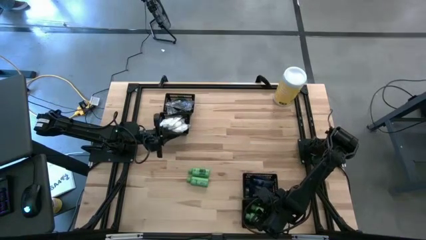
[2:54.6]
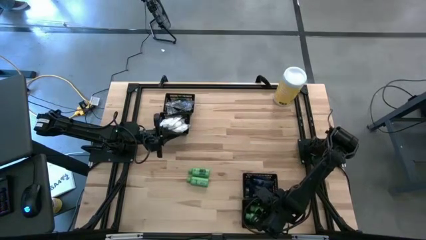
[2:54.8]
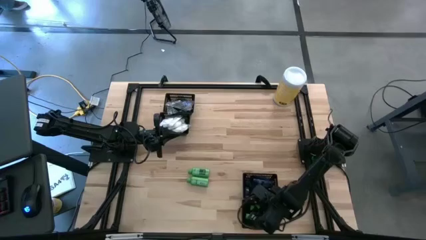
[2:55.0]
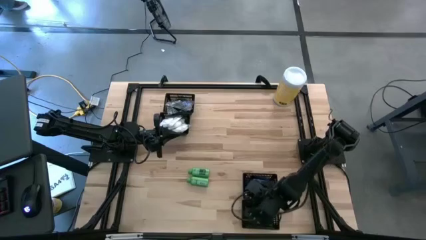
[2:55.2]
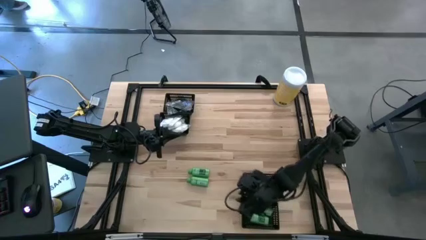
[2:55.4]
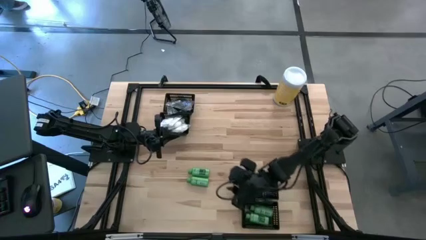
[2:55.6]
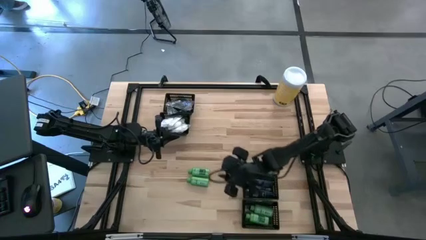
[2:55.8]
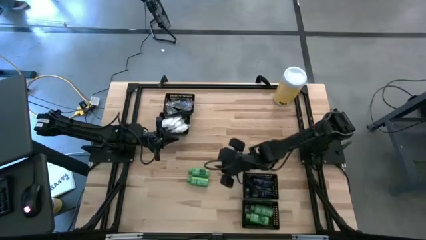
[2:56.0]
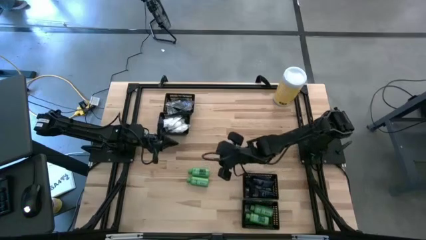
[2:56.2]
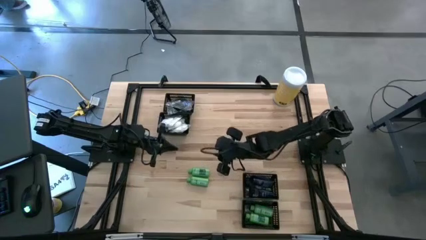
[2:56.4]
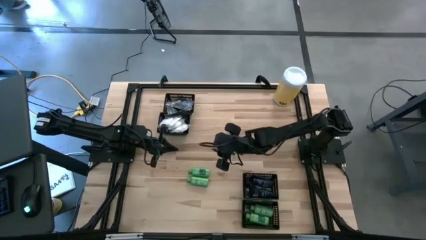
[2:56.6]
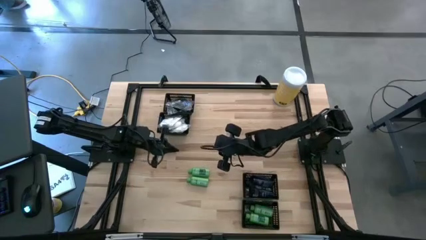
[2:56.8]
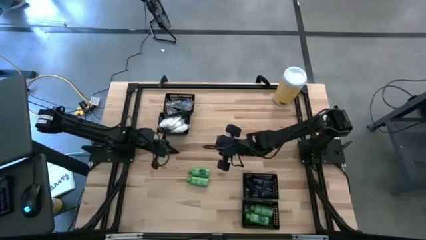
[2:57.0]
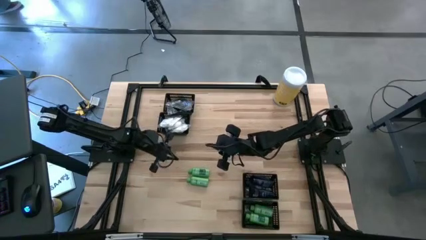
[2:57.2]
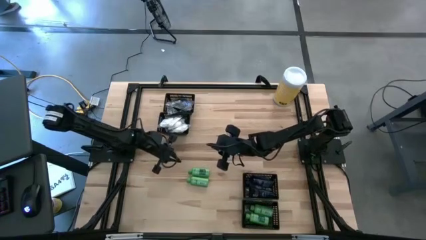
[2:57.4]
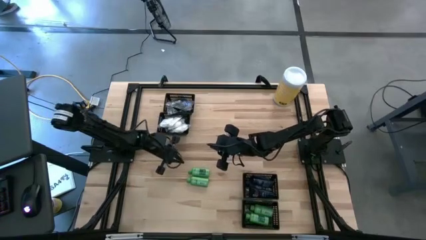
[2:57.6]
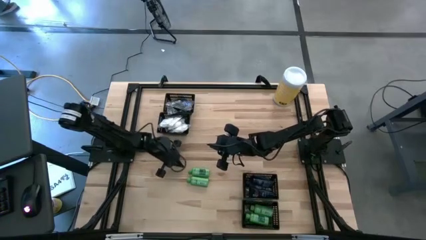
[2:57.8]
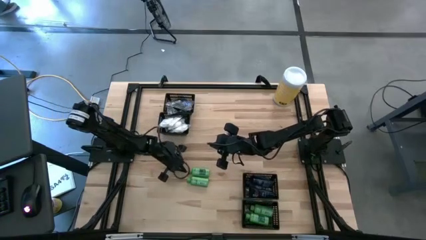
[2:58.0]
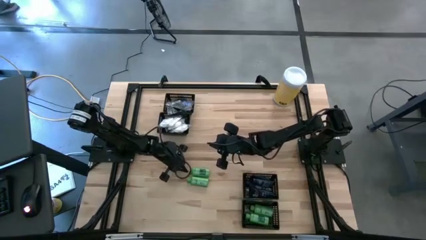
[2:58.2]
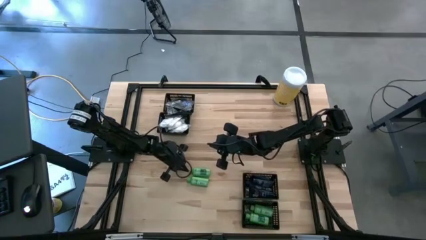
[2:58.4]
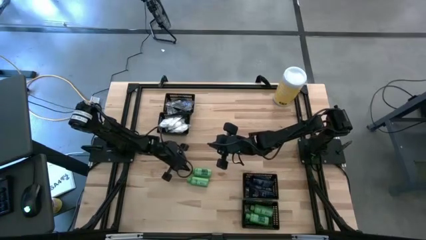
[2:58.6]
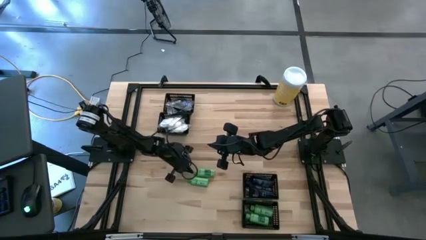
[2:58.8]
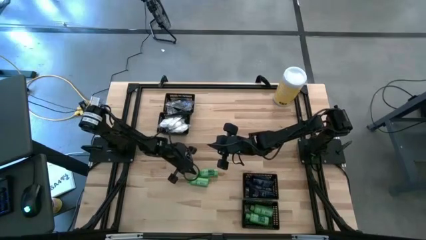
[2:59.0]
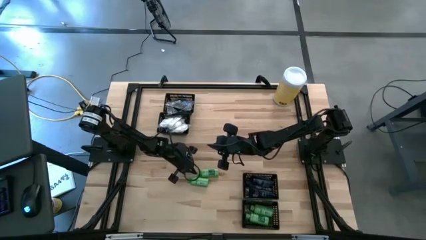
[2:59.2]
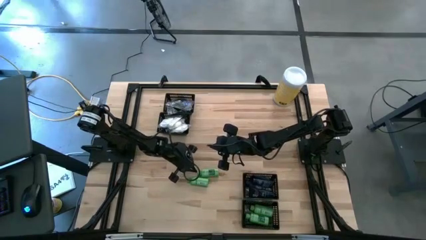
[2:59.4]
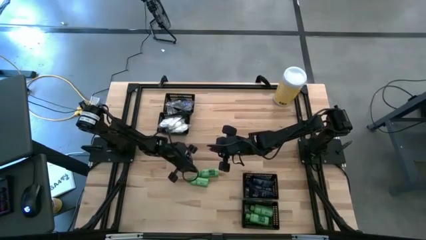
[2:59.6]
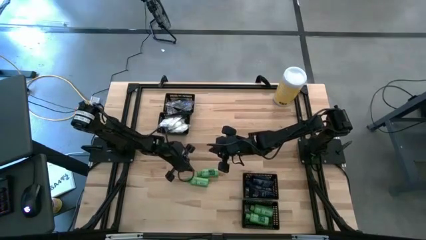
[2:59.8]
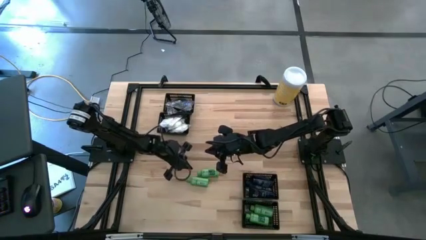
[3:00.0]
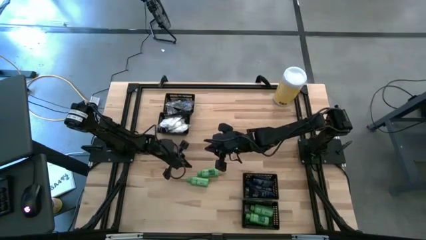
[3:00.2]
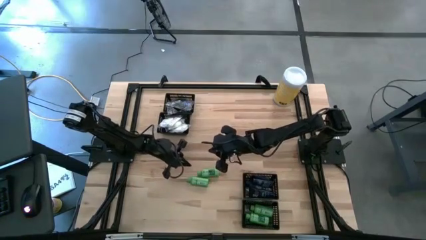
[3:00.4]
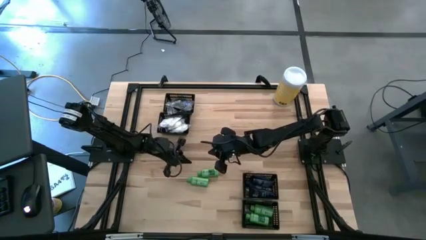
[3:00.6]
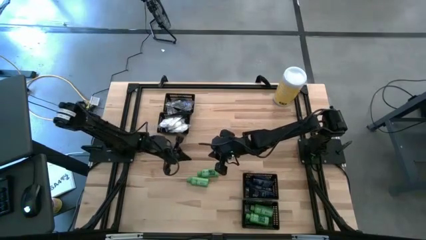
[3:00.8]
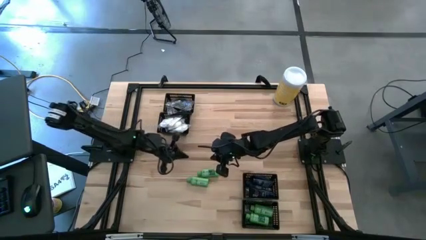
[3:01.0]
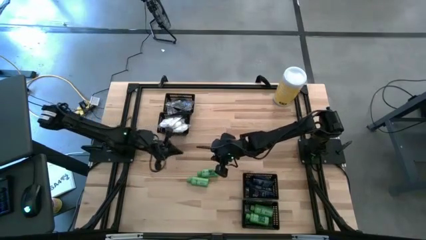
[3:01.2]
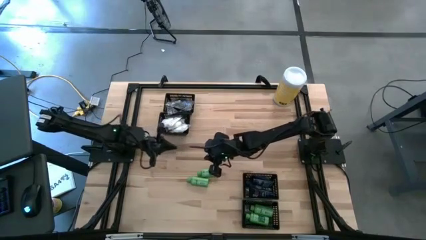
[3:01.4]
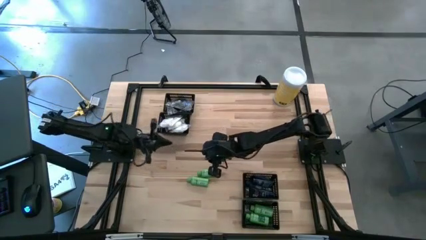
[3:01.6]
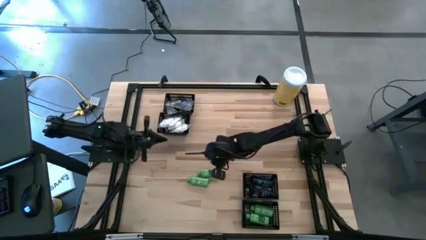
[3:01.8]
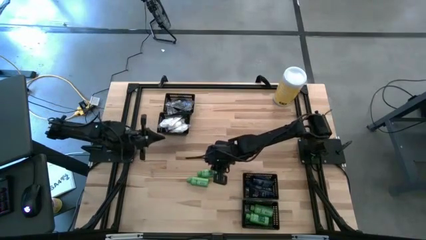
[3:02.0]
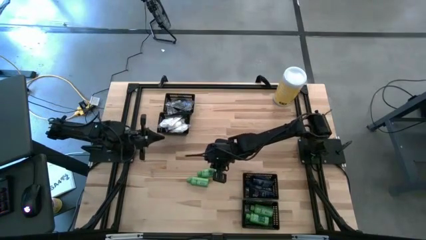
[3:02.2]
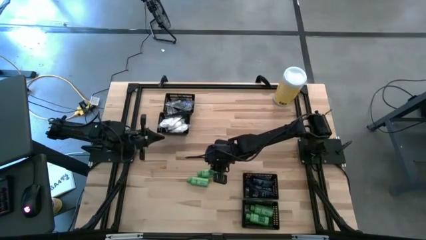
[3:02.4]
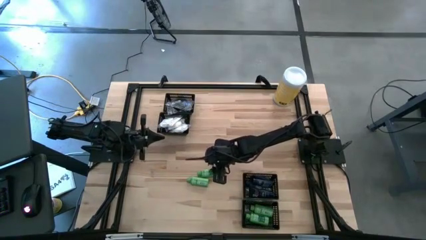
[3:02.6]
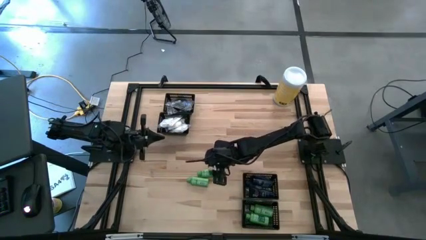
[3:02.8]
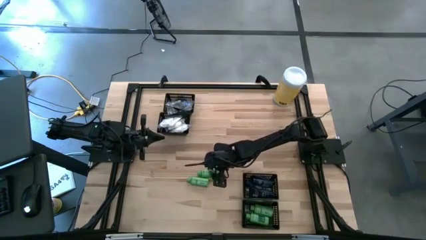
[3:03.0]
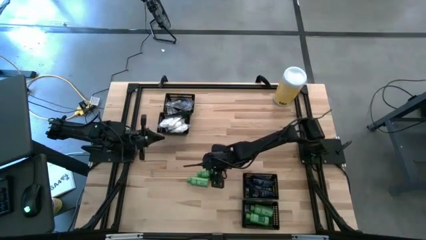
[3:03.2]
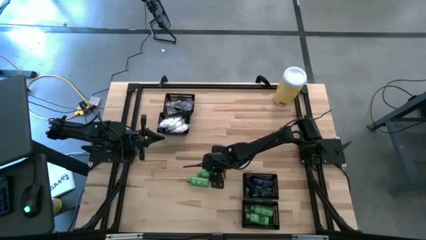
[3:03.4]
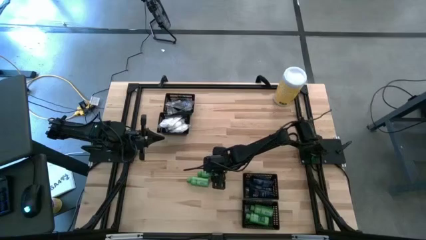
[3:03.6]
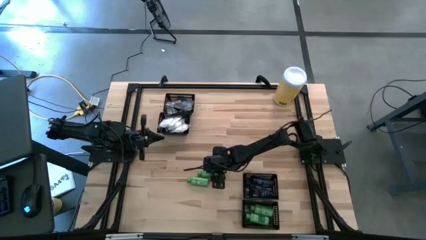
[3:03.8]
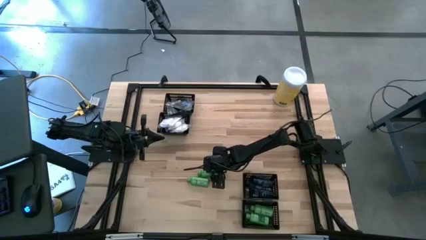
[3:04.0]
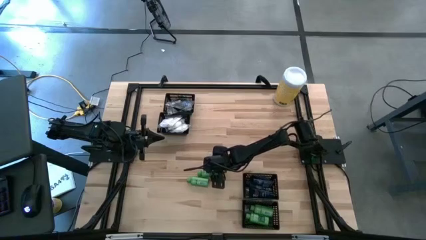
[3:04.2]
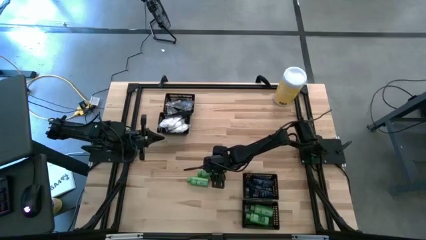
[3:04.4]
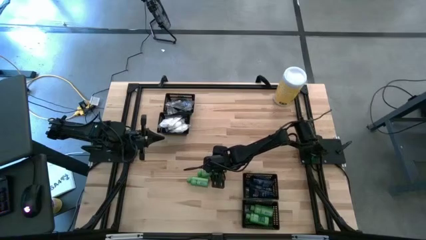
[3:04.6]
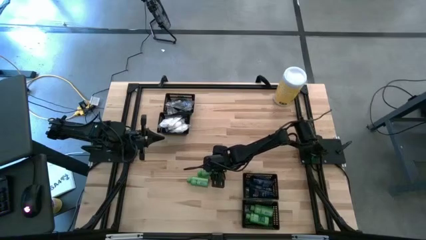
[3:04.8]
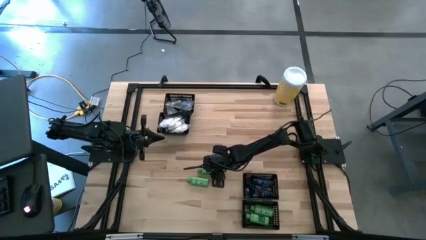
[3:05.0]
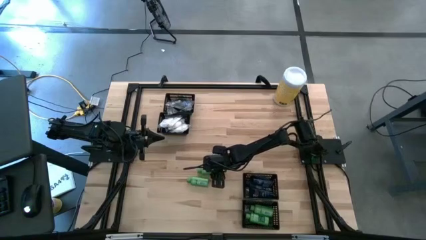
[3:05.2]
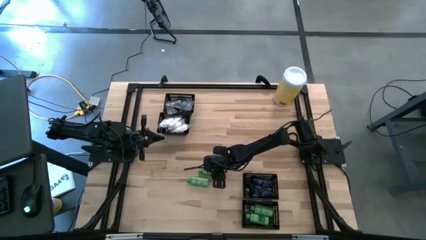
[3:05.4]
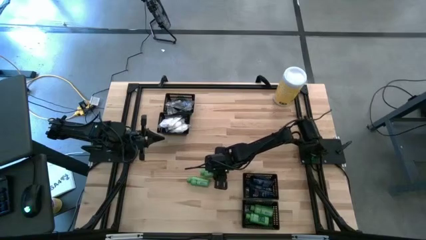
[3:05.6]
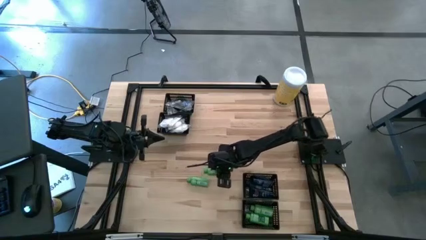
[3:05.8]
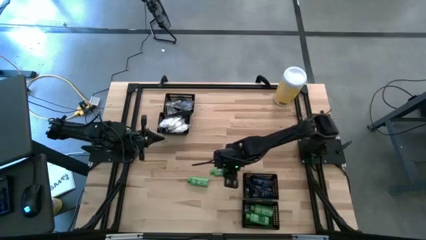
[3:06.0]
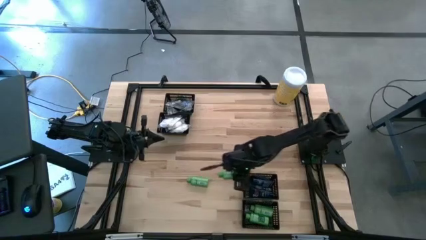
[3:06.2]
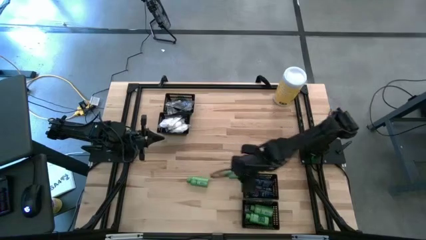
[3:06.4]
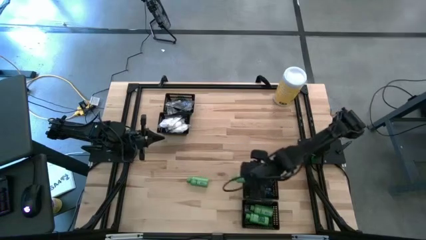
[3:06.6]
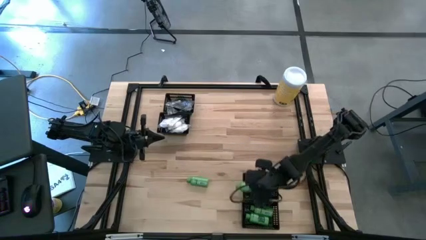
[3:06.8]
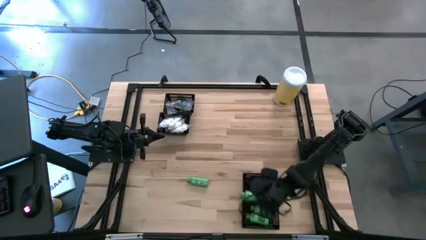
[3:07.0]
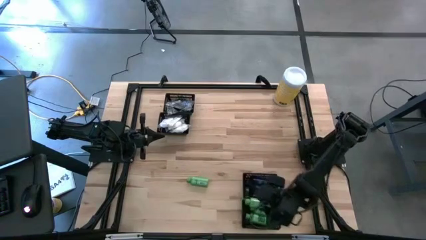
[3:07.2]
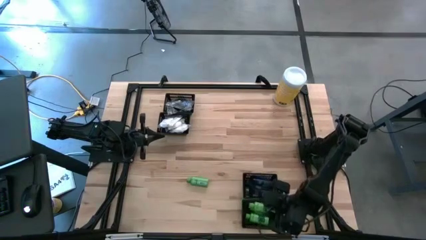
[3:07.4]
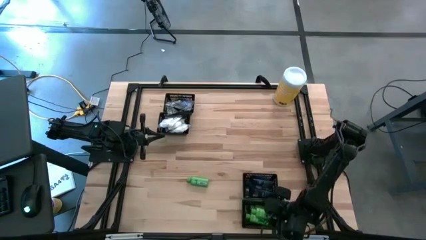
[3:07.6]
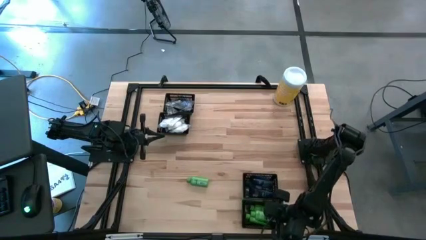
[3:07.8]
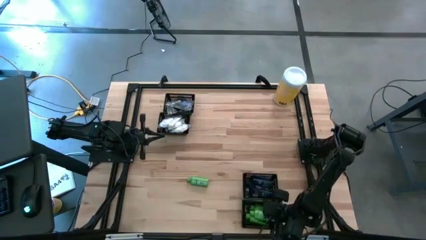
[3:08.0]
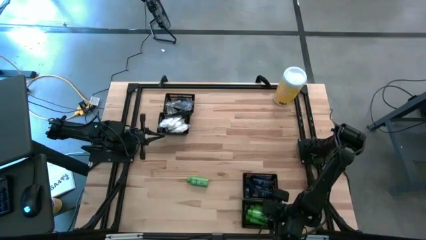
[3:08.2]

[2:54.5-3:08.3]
Task: Pick & Place Travel size toiletries
Put the green shampoo into the bottom black basket
